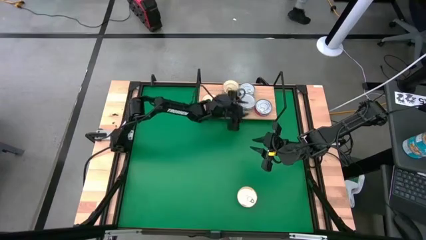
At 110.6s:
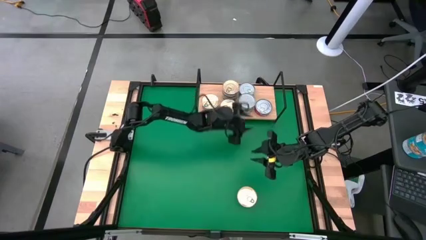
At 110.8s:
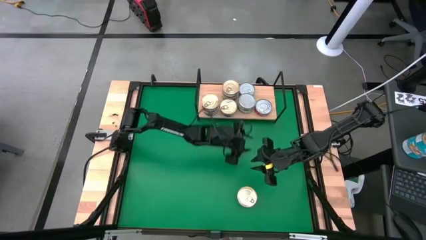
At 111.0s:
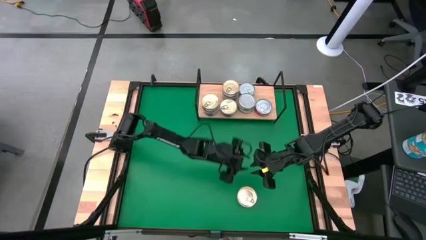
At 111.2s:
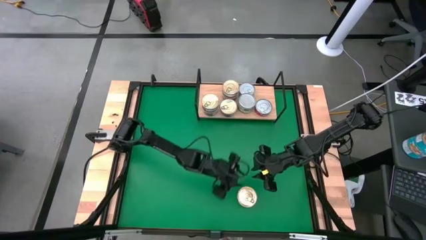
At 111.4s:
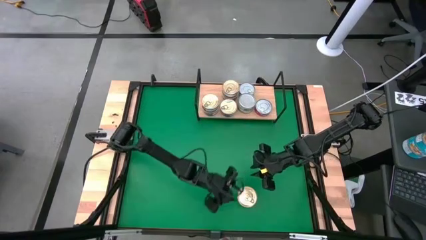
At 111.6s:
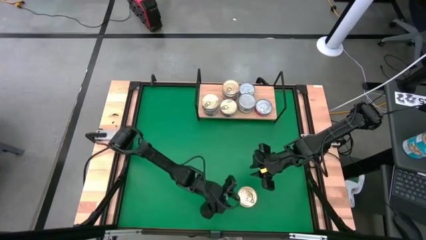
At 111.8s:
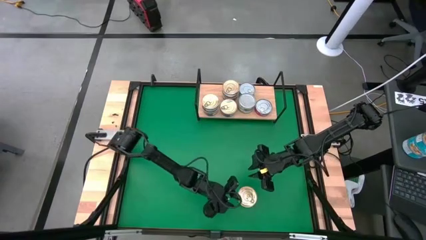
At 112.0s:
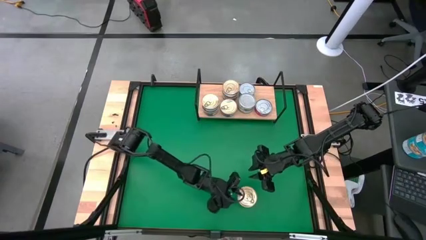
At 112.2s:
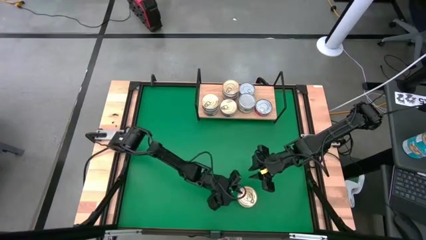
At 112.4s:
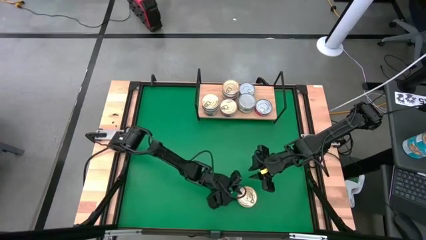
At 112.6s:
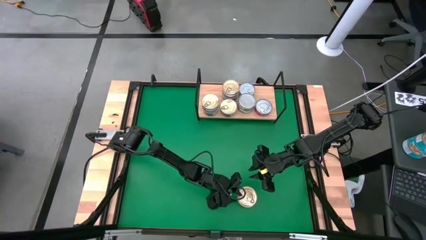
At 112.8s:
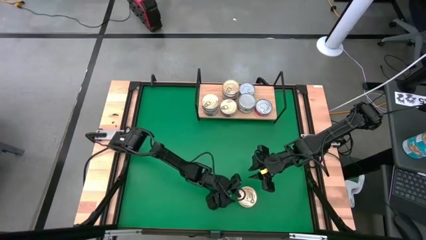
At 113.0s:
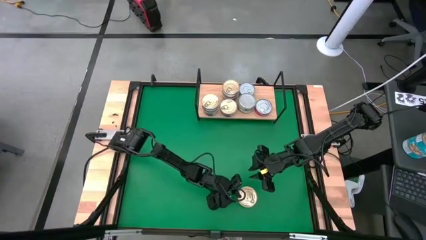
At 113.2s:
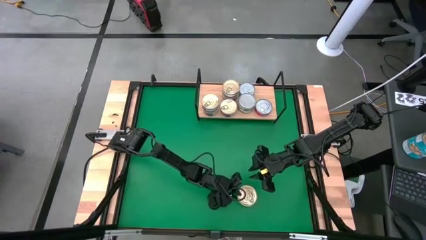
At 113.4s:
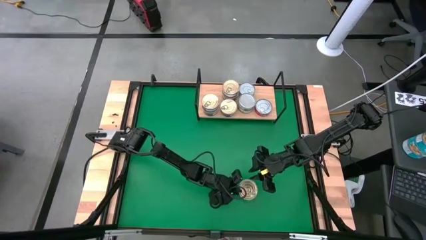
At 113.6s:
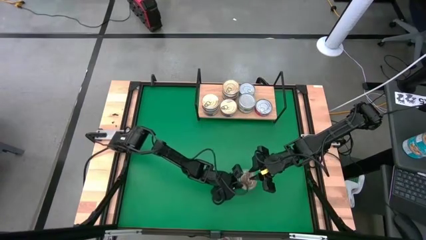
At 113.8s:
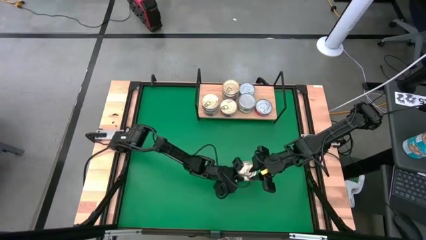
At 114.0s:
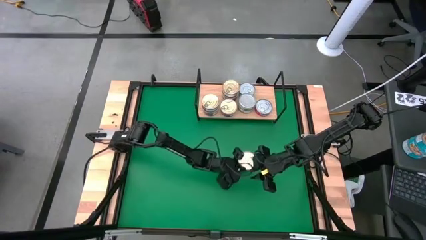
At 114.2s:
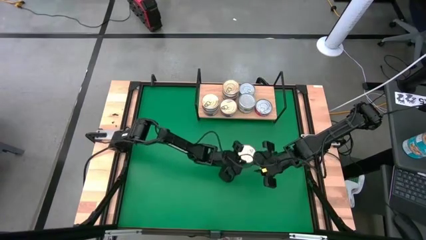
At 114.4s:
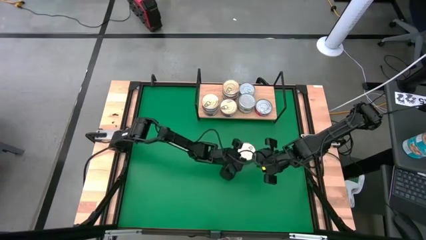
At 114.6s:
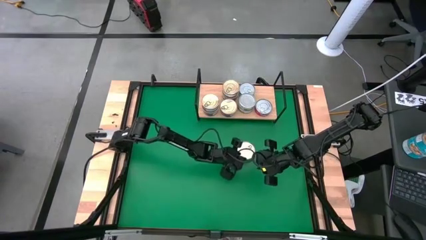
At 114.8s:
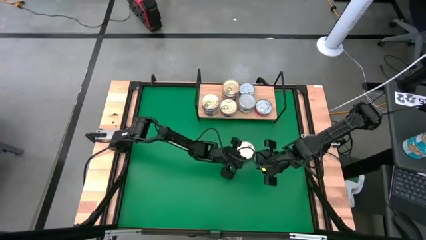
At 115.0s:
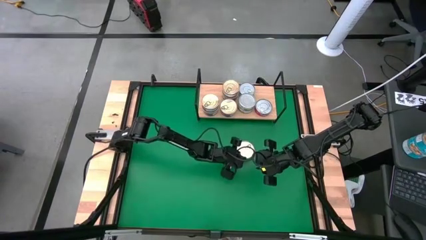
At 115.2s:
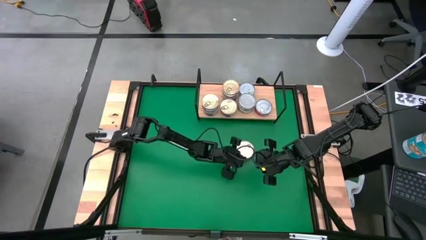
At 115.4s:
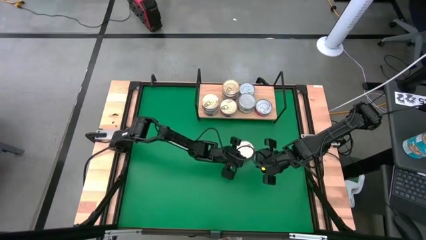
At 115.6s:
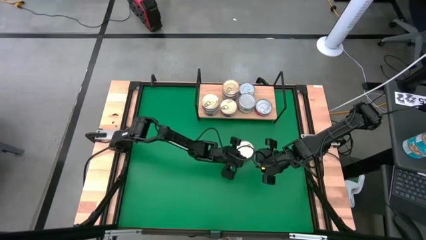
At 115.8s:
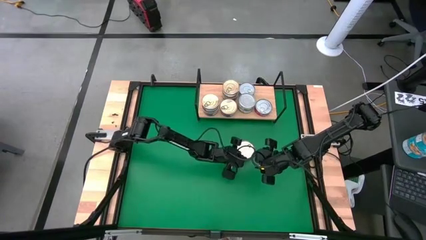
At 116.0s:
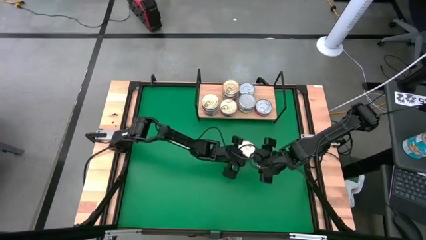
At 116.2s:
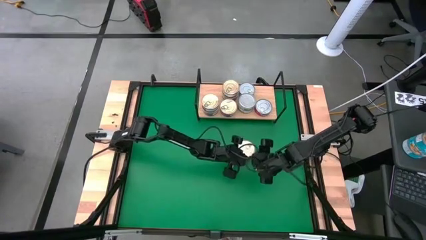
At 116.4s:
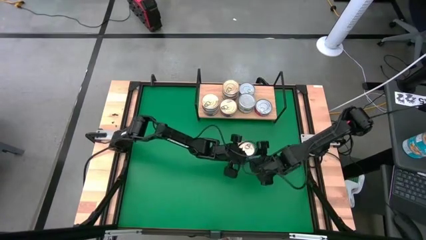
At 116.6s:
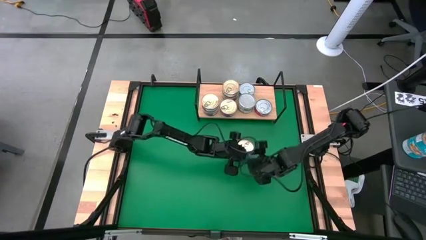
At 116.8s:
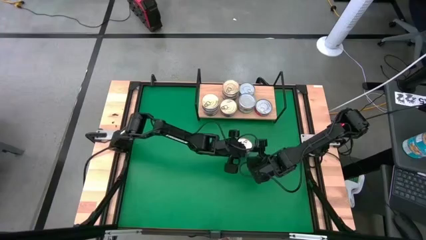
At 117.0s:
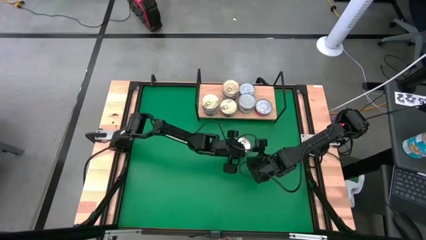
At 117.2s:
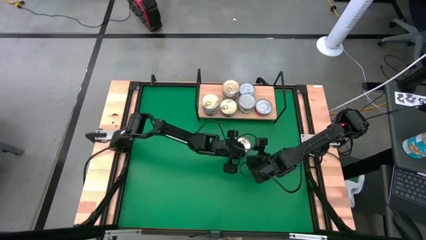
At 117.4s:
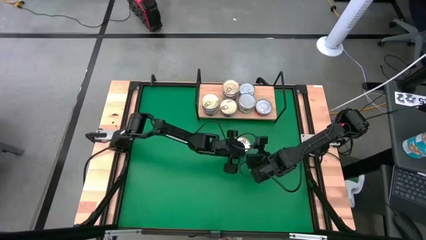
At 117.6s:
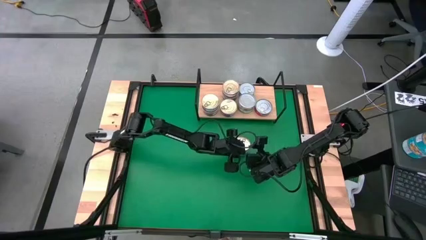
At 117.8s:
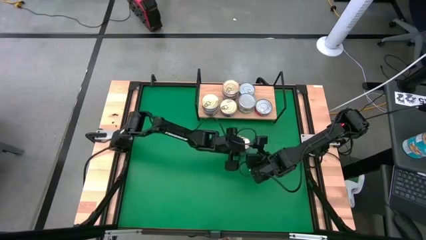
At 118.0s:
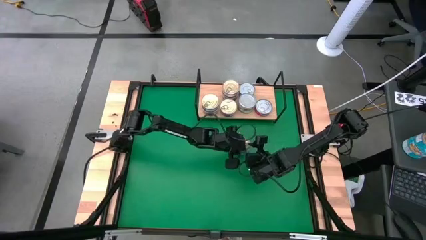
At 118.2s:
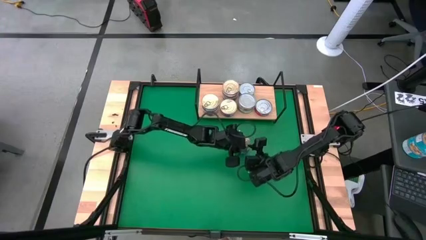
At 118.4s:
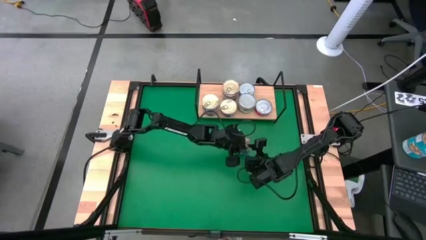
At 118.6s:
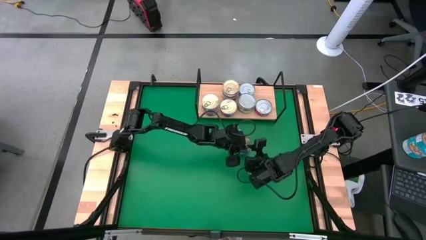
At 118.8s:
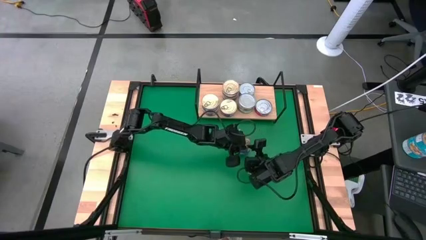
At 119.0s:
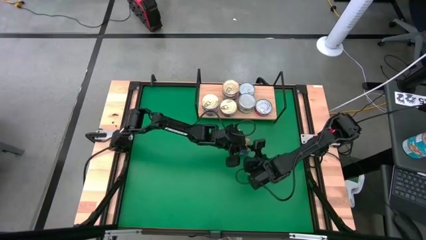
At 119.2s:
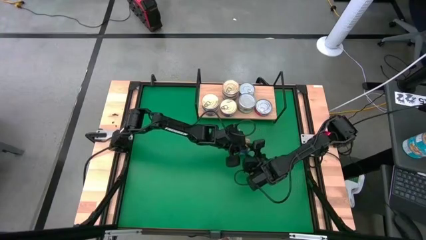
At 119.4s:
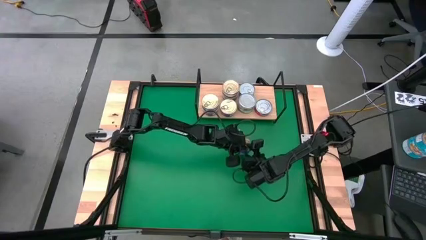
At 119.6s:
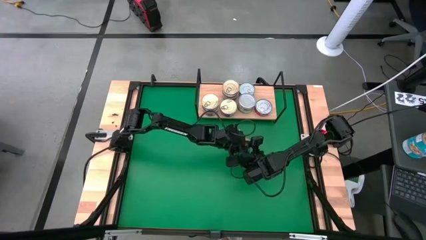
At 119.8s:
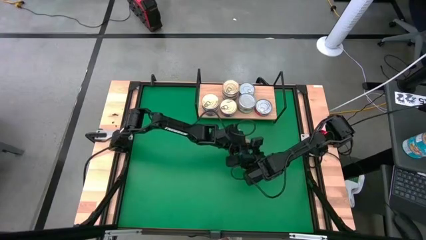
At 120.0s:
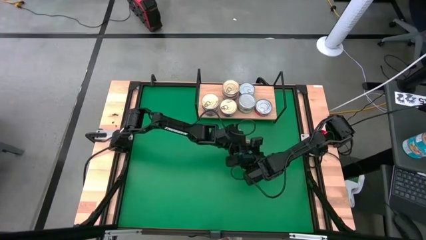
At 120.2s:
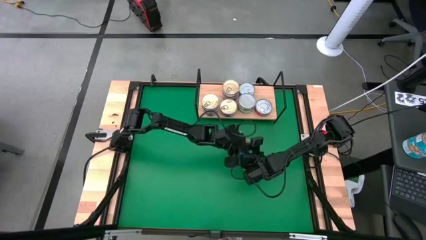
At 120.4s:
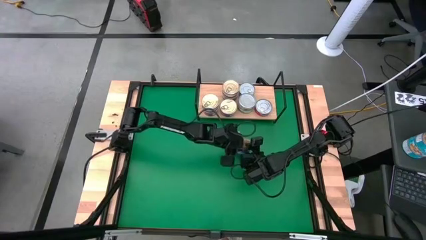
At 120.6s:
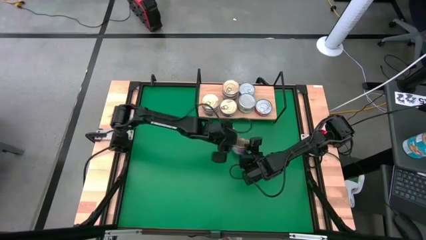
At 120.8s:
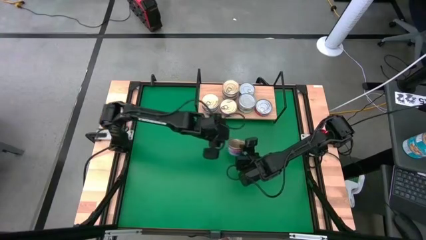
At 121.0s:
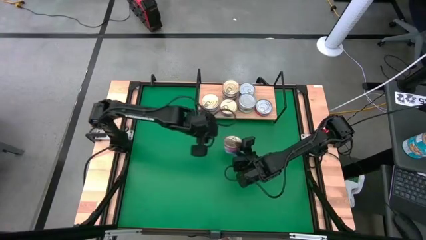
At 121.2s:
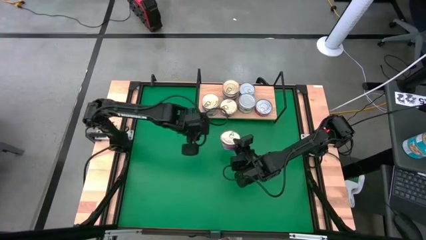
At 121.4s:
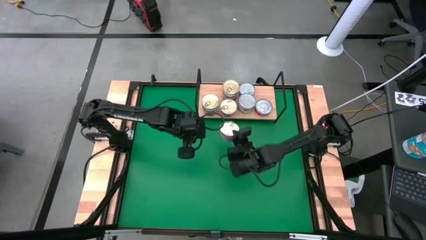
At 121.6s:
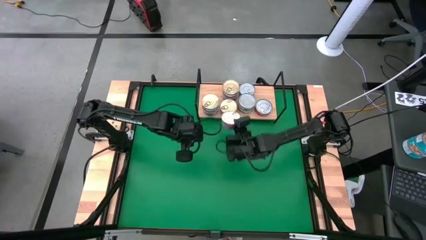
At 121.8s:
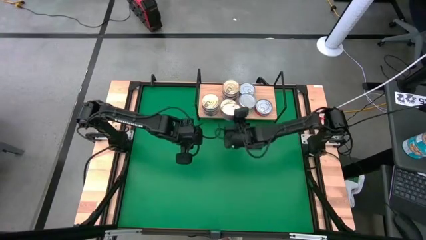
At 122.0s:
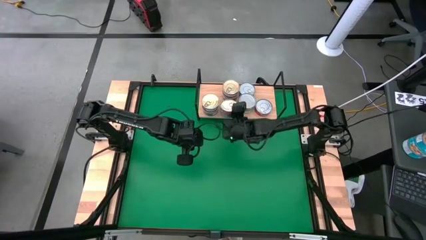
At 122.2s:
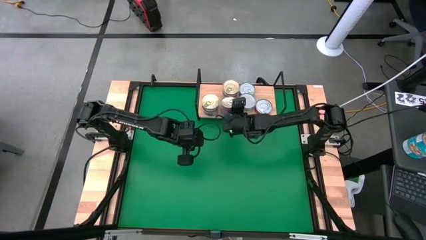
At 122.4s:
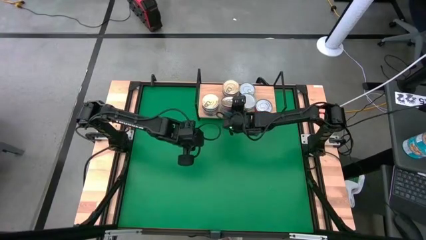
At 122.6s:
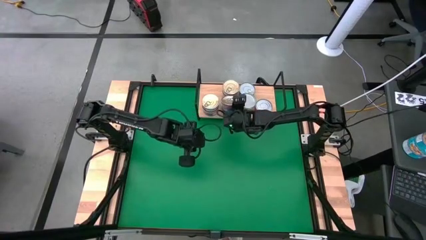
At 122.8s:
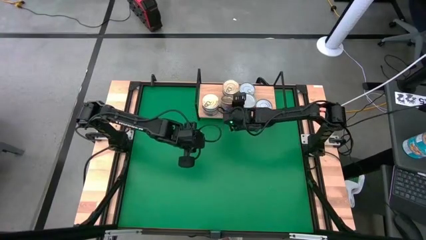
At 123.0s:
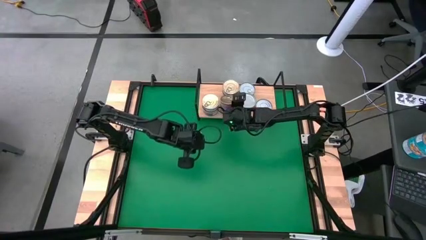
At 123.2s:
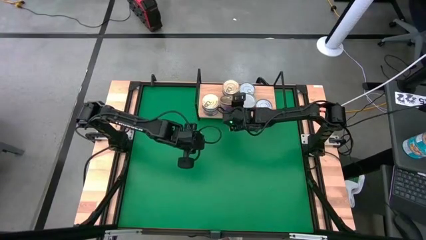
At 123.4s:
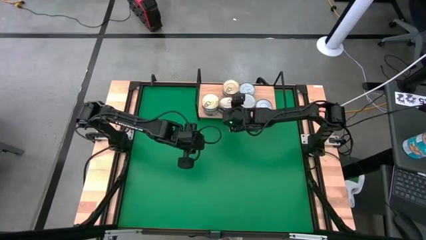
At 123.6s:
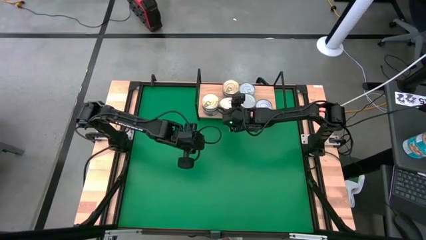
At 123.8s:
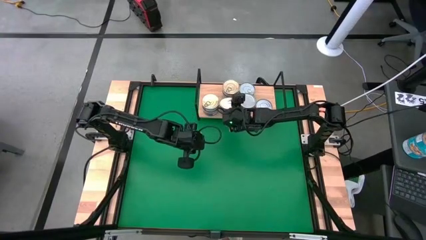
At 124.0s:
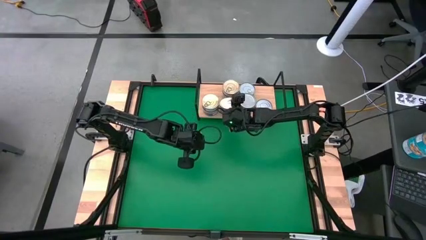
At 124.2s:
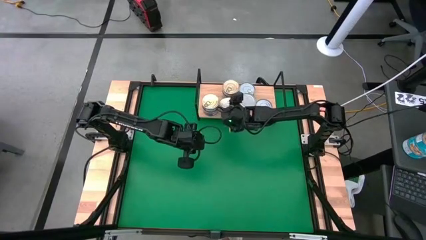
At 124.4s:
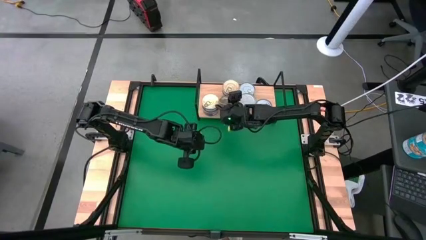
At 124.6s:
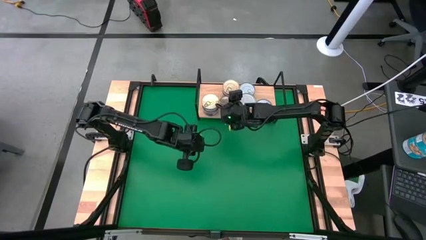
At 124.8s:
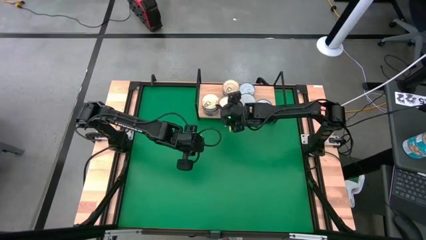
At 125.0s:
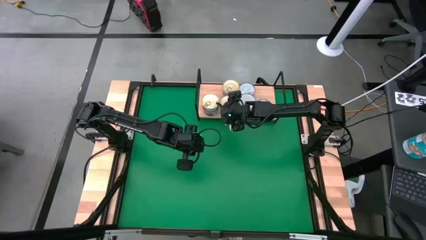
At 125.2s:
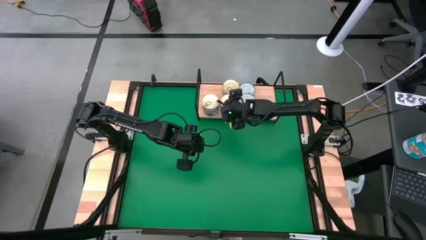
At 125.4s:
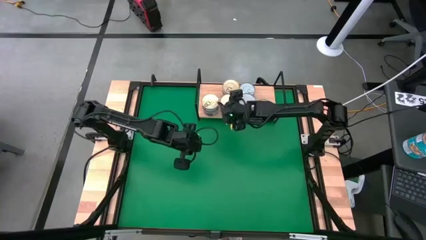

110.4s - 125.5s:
Task: Stack canned seafood by type on shelf
Stack the blue tuna can on top of the blue tuna can on the shelf
